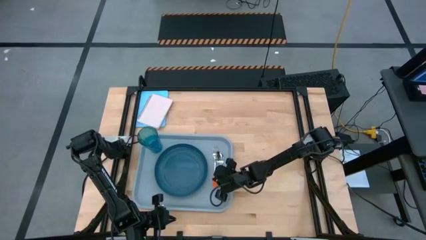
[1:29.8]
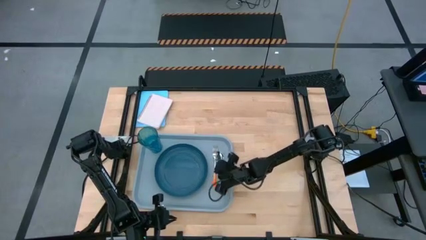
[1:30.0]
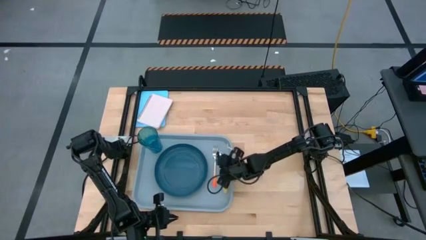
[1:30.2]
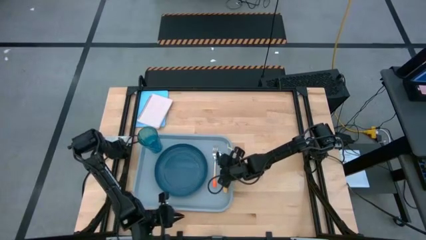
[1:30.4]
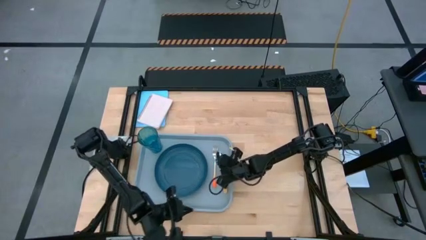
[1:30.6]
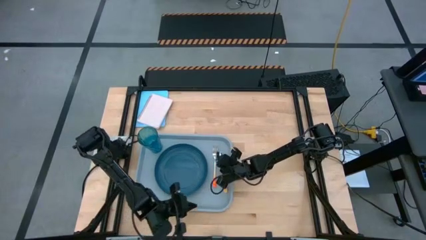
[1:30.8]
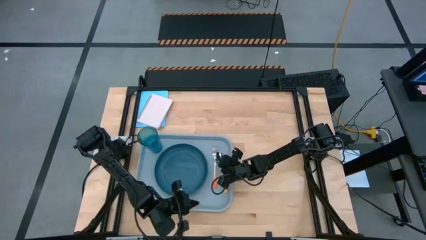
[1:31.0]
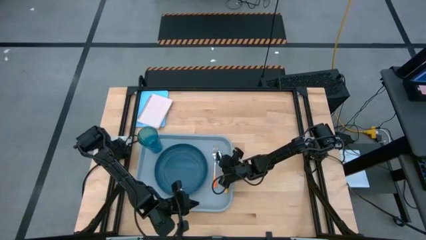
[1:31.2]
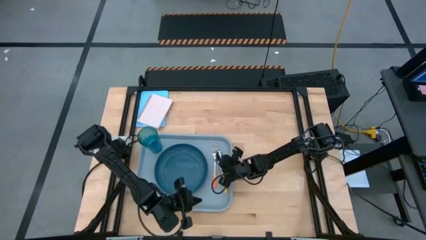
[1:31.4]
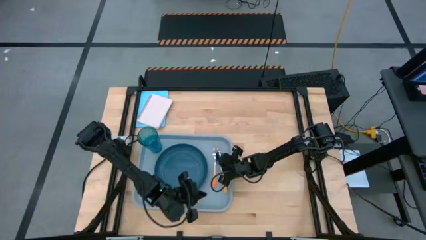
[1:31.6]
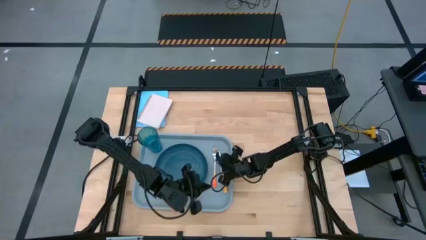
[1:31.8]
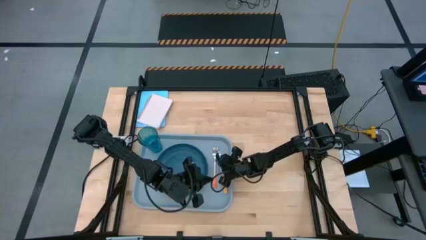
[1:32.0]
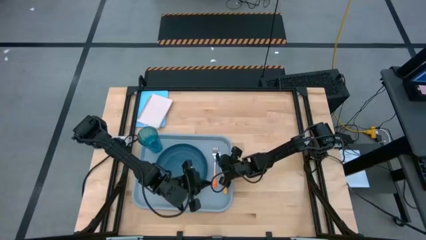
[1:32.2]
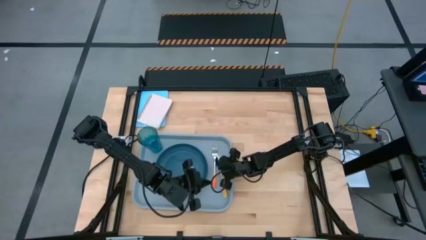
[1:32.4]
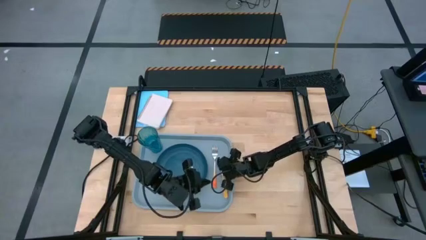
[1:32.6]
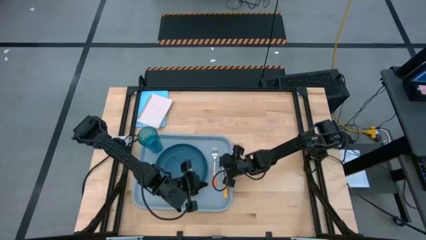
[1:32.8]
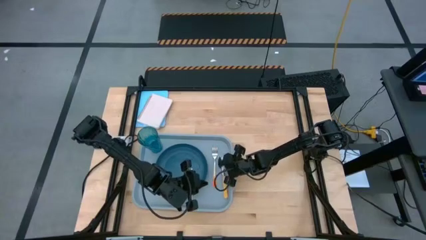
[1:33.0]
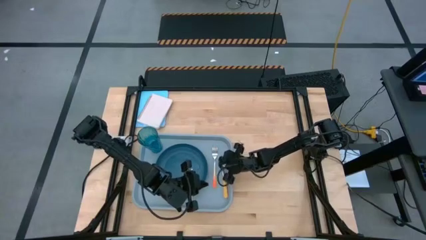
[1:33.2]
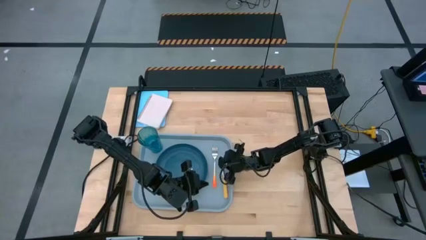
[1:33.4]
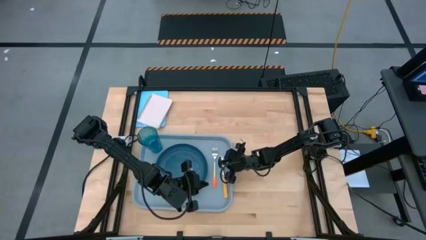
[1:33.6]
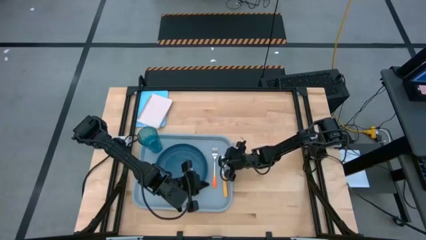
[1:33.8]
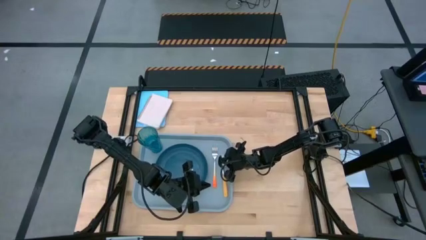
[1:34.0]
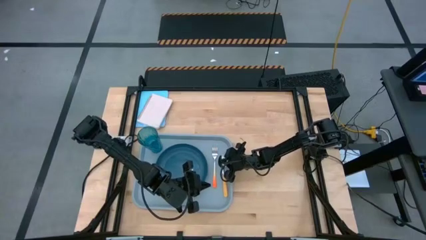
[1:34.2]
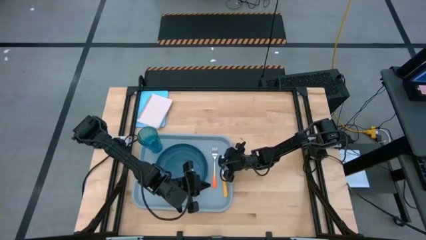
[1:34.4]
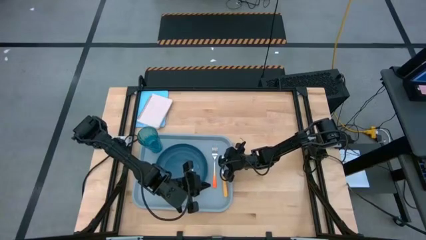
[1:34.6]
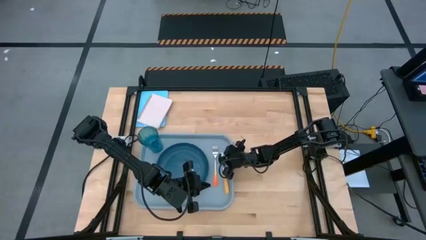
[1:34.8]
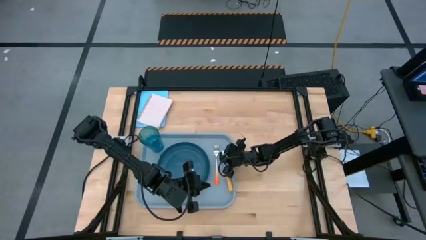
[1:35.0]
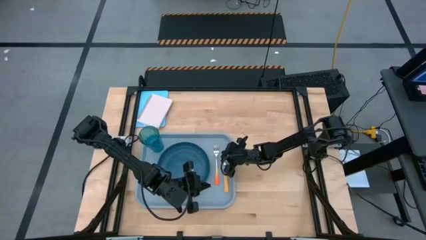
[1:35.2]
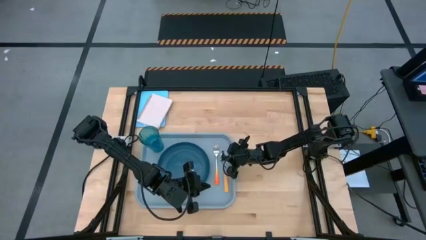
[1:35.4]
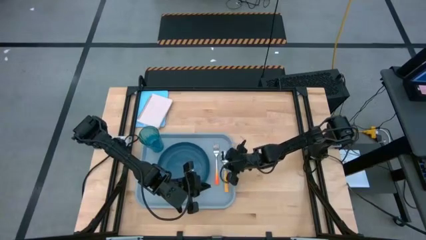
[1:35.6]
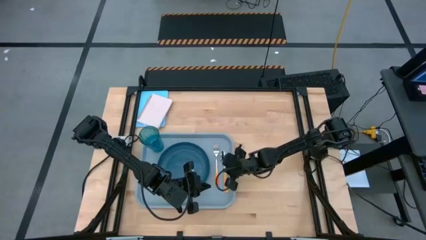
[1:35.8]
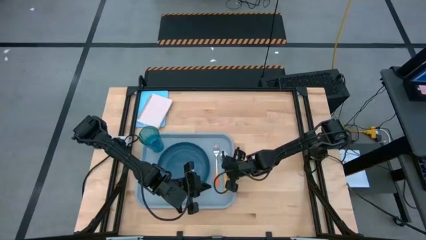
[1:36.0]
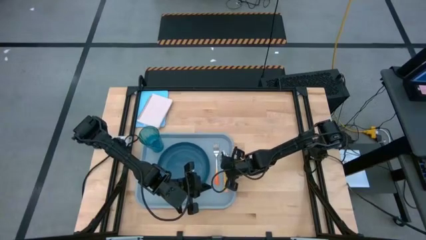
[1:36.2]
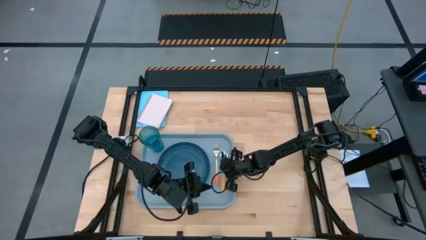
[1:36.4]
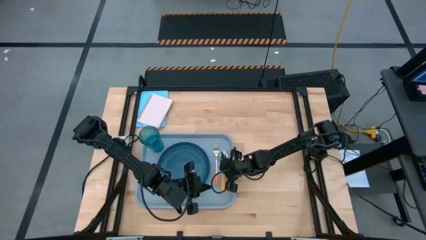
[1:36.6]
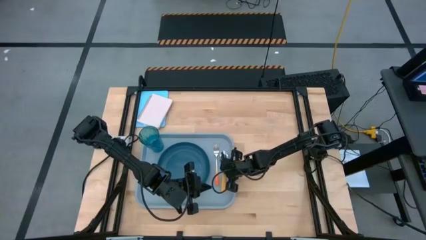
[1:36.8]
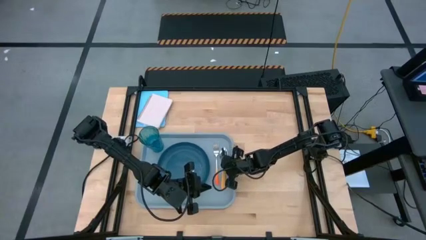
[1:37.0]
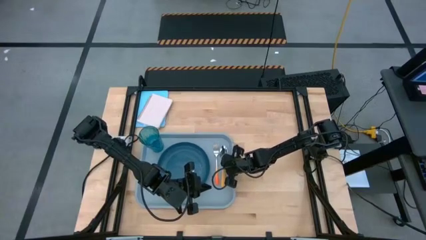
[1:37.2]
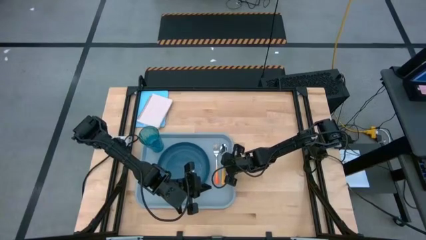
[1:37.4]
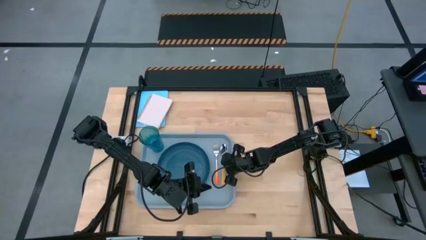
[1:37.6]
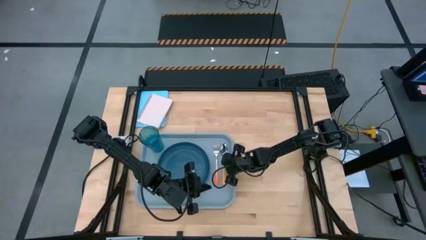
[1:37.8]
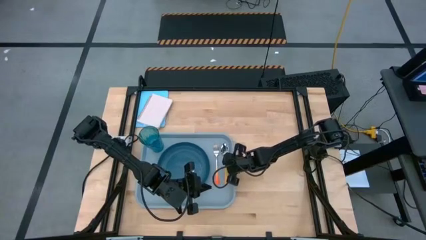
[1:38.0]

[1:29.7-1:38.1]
Task: Pick and place plate/cup/fork/spoon on tray
Adjust the yellow spoon on the gray tray

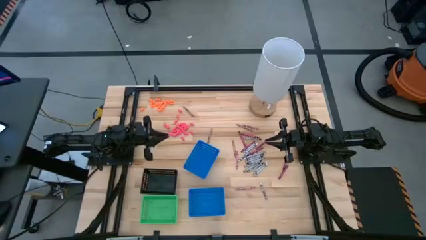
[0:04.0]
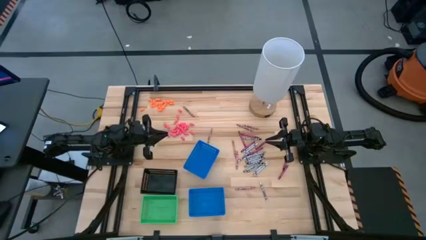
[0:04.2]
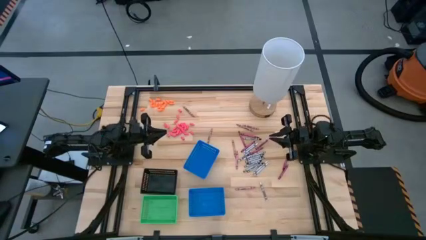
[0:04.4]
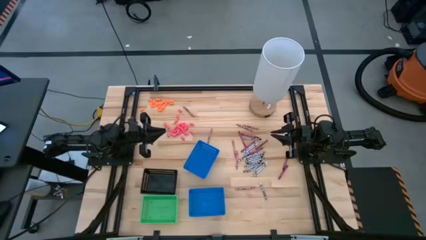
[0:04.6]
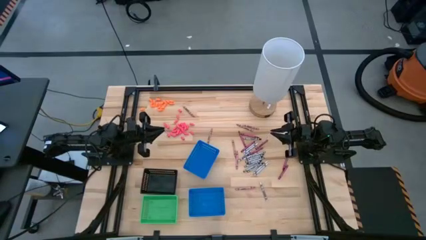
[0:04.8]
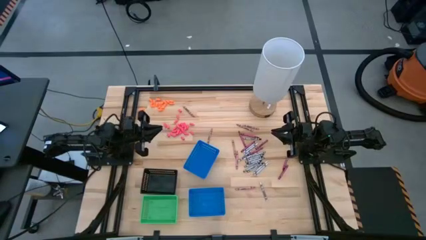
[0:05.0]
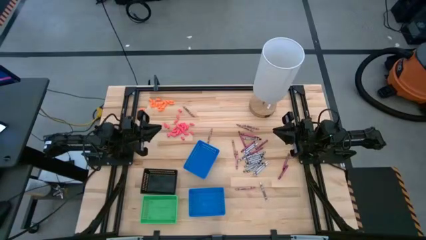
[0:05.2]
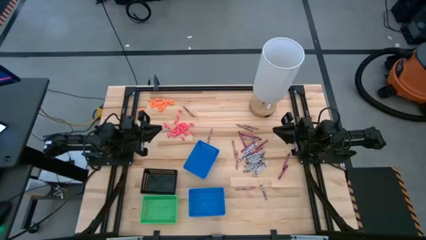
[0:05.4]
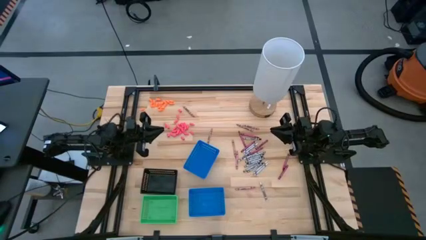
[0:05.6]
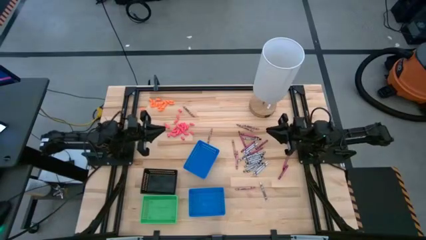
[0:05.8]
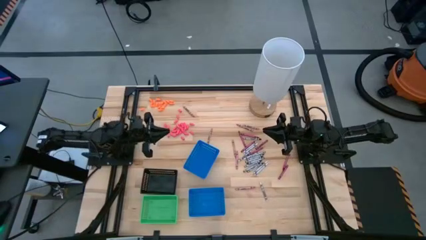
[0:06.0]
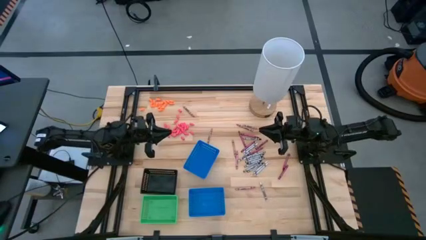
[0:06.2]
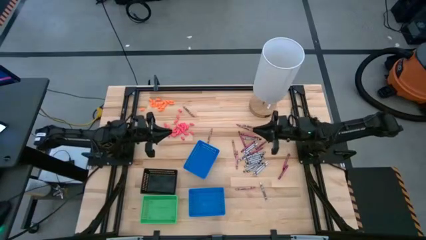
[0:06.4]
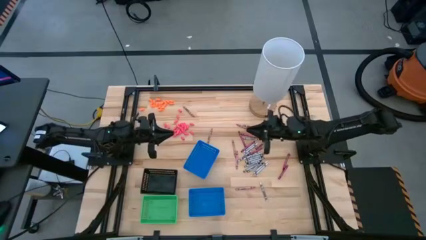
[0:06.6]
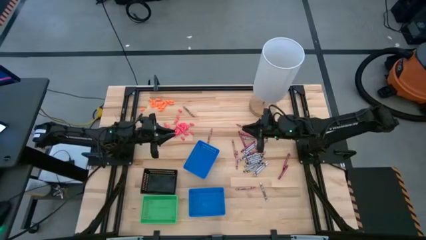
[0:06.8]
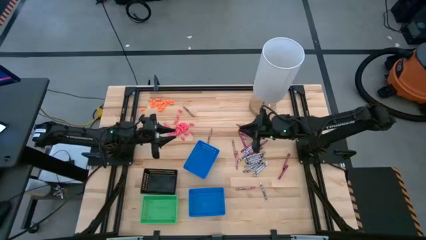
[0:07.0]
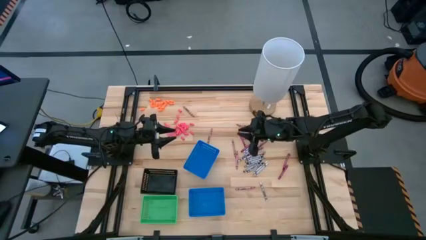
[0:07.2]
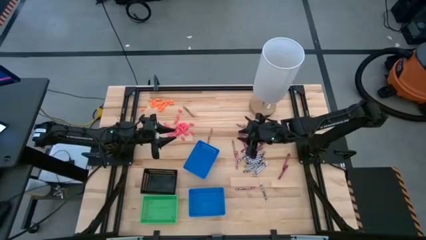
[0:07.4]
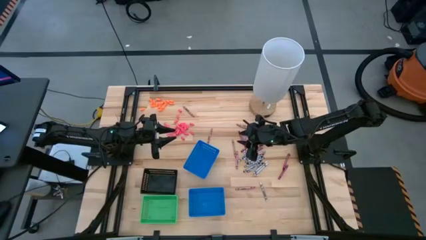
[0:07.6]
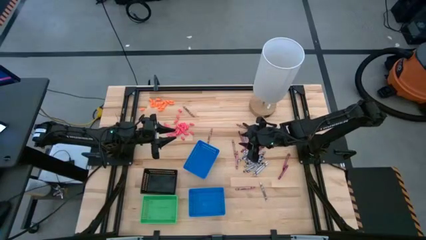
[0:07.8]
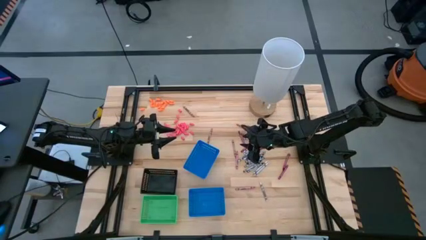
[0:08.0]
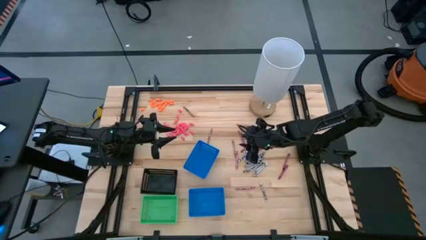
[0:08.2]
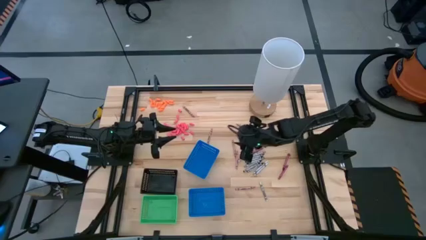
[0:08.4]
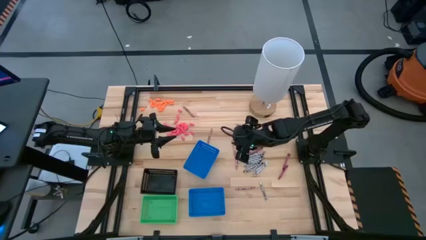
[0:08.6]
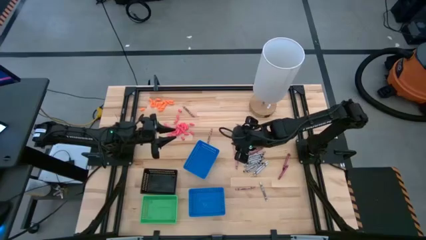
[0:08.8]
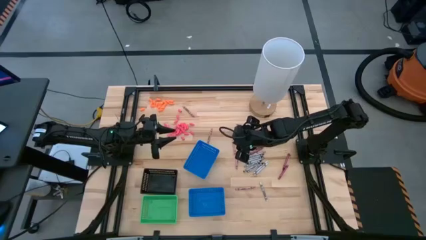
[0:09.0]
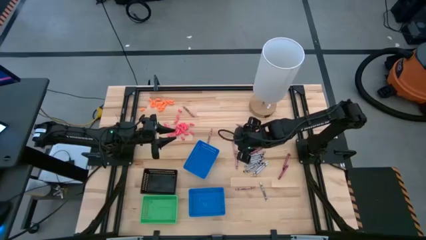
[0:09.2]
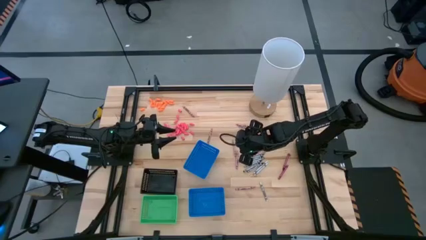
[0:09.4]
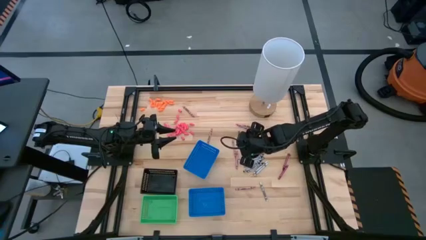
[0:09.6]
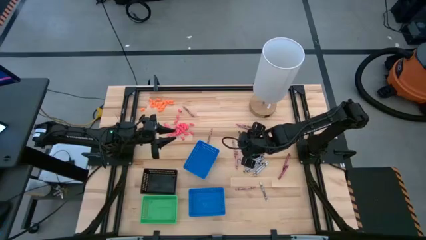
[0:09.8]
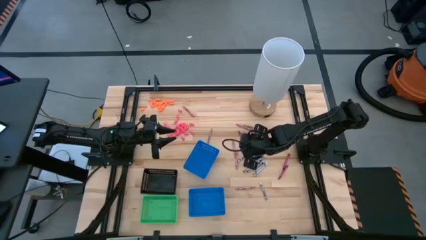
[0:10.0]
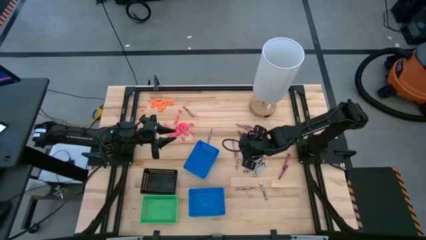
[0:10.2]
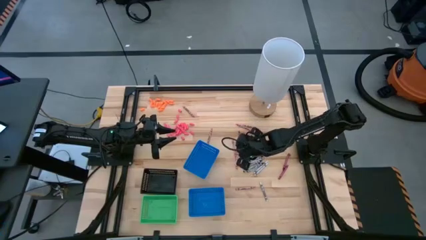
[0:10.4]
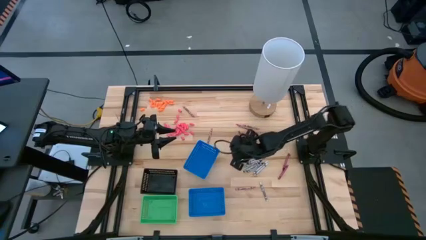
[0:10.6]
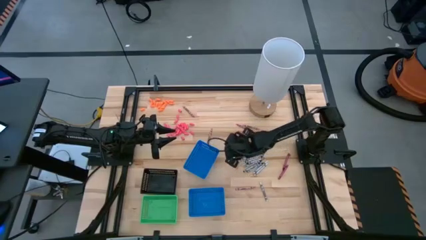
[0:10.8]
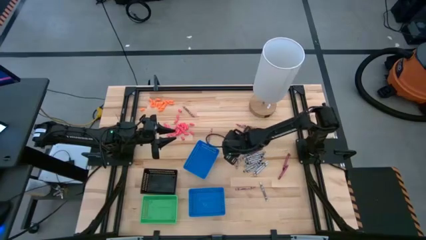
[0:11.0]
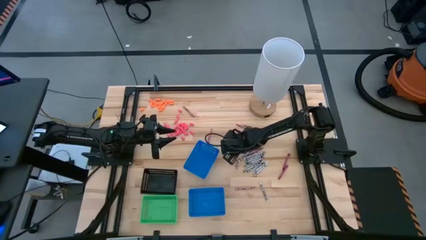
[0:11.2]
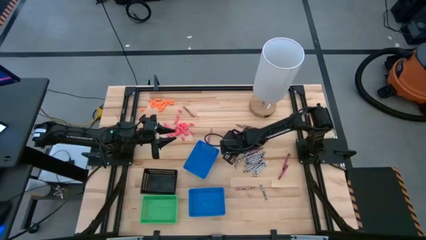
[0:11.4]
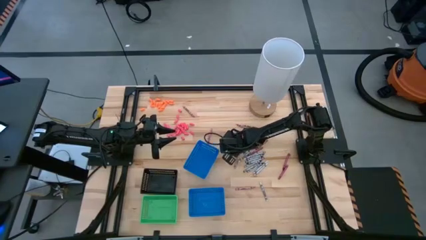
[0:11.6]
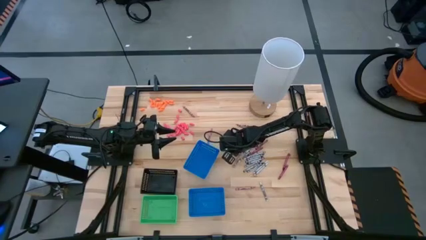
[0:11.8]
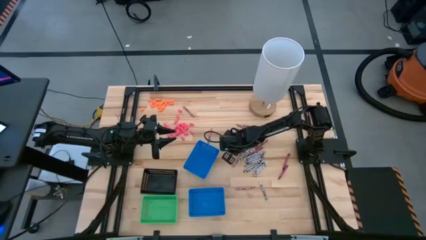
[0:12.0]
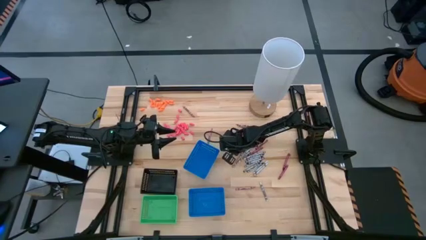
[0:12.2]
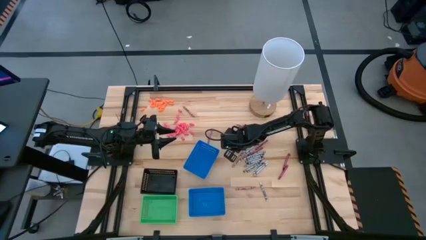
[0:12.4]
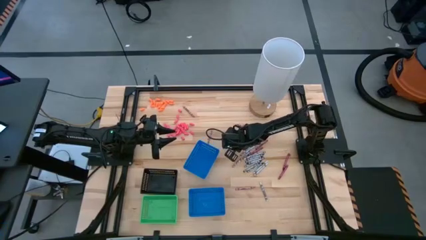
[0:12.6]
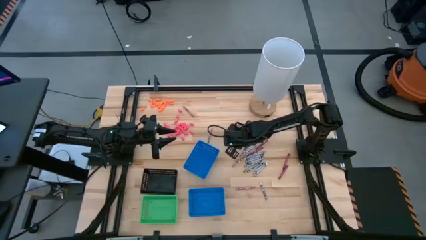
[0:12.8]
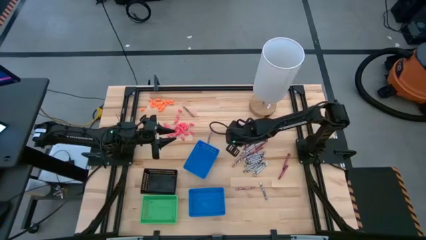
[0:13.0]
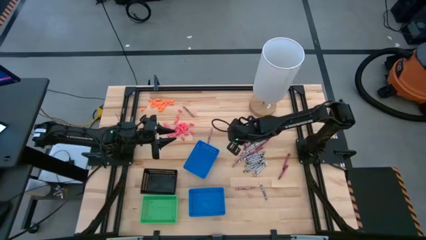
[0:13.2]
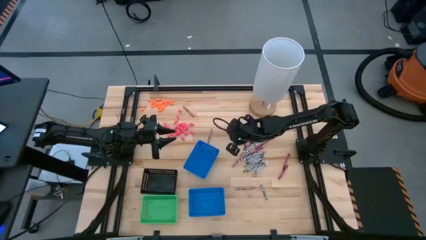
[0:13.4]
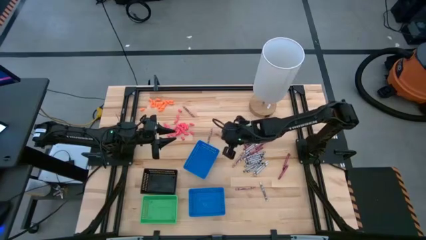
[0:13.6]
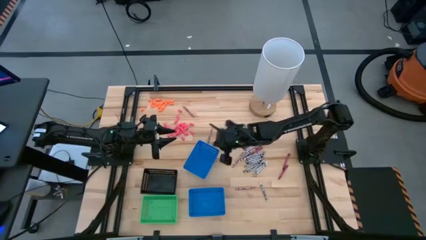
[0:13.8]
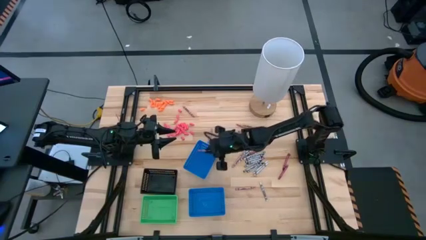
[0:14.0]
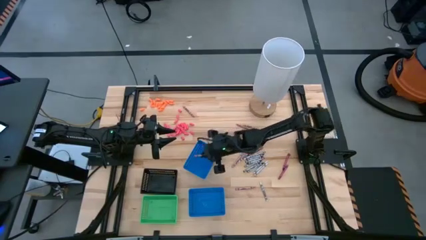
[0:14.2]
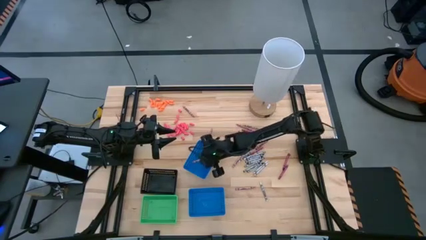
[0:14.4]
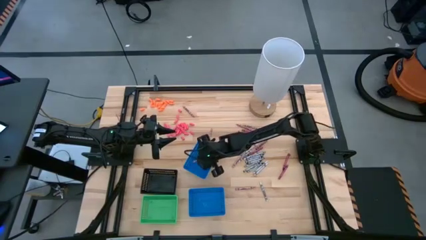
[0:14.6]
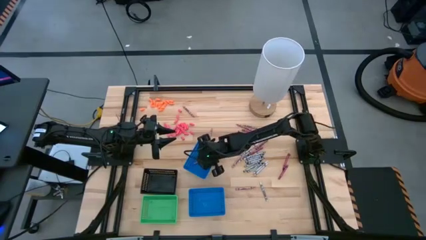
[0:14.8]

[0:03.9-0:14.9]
Task: Sort crayons
Put the pink crayon into the top blue bin
